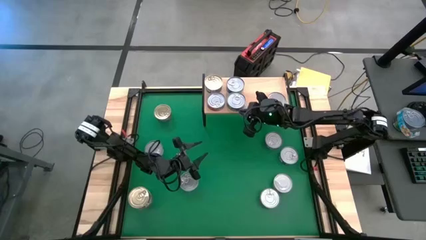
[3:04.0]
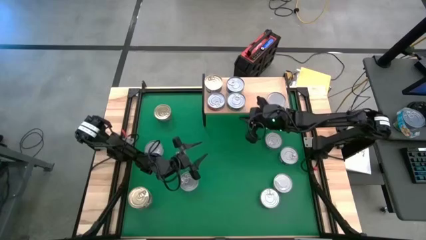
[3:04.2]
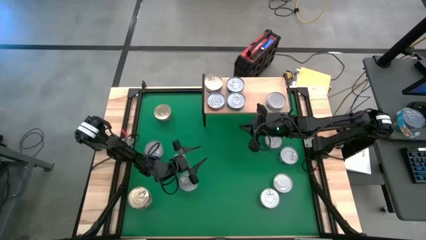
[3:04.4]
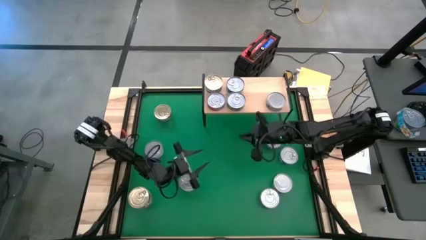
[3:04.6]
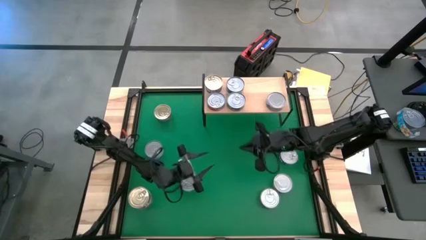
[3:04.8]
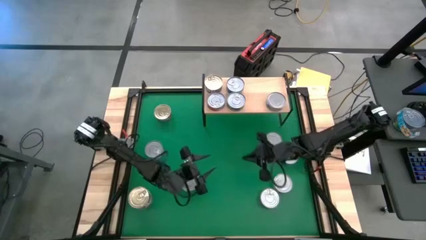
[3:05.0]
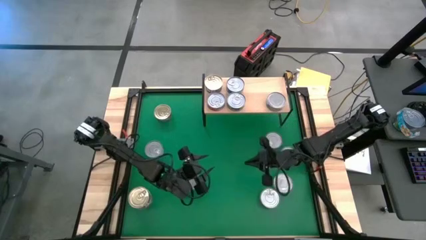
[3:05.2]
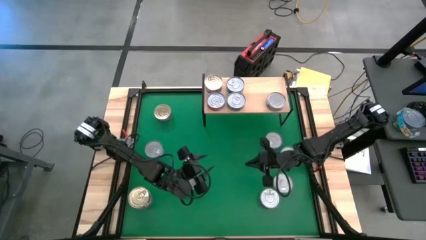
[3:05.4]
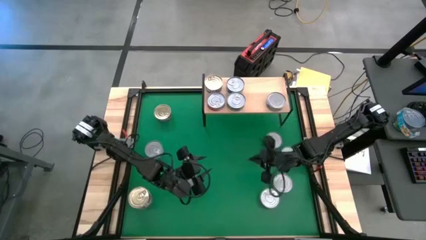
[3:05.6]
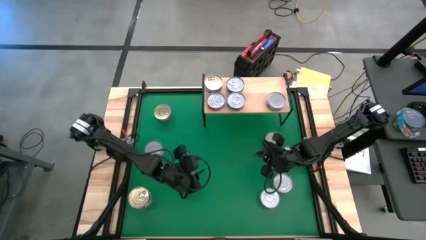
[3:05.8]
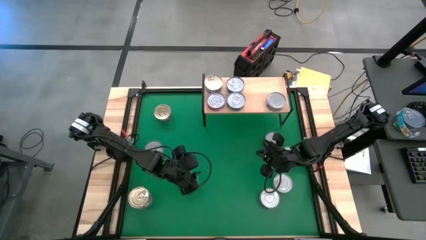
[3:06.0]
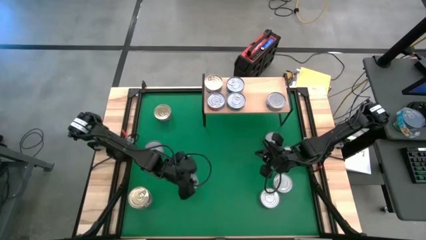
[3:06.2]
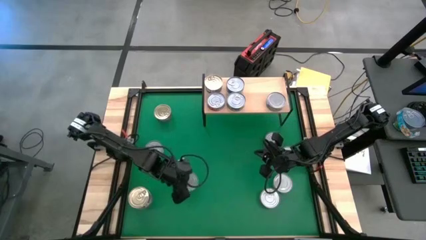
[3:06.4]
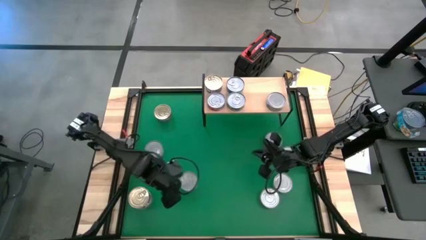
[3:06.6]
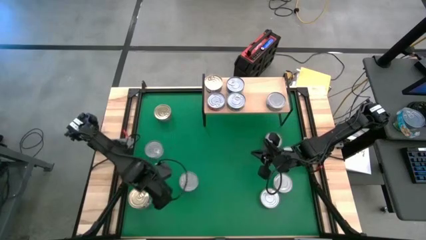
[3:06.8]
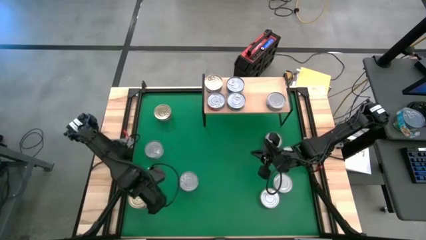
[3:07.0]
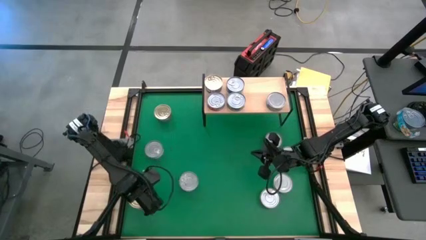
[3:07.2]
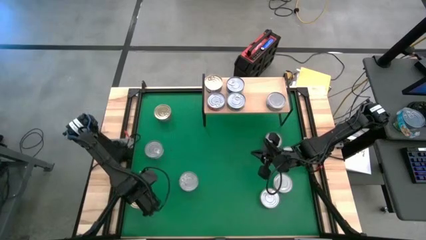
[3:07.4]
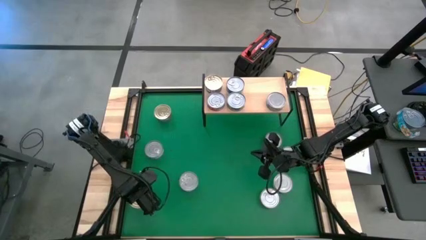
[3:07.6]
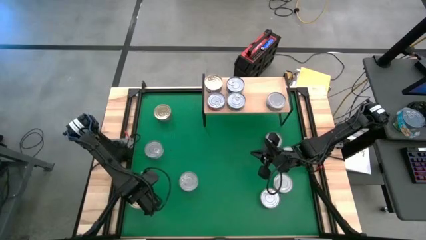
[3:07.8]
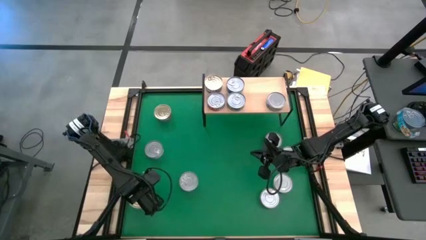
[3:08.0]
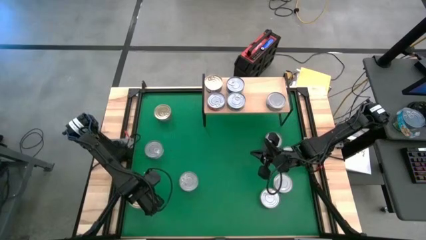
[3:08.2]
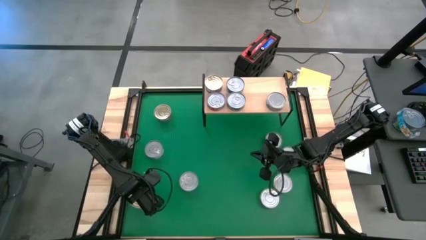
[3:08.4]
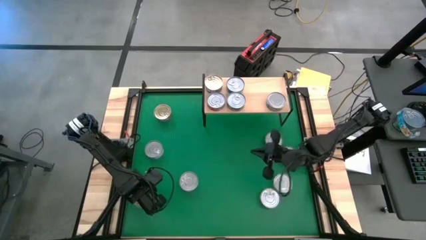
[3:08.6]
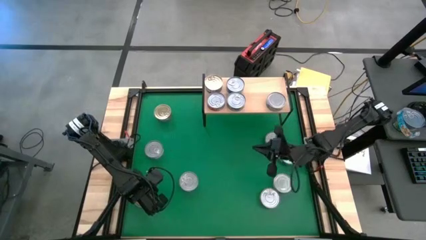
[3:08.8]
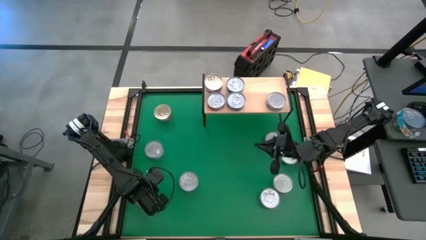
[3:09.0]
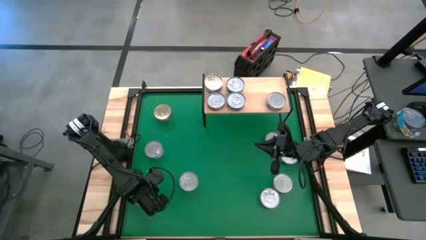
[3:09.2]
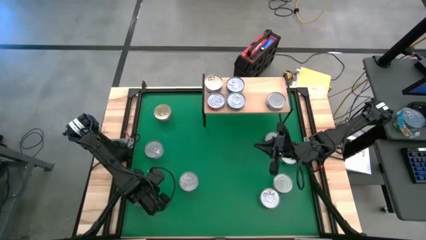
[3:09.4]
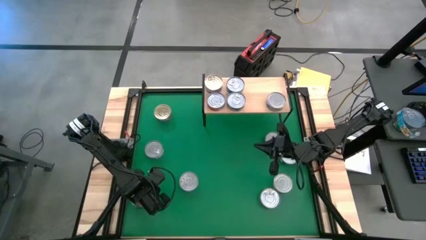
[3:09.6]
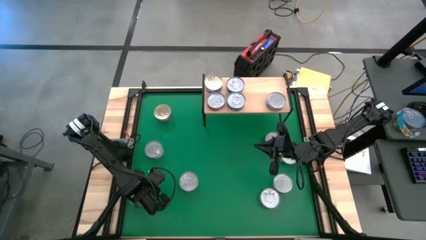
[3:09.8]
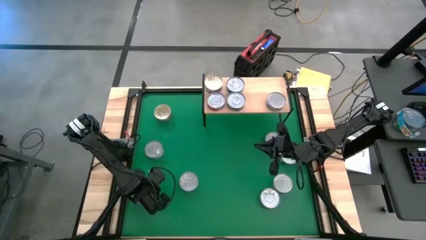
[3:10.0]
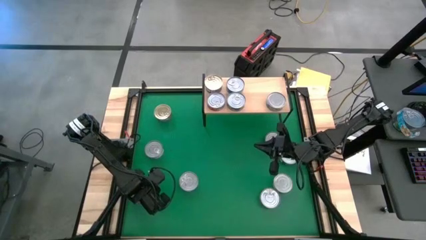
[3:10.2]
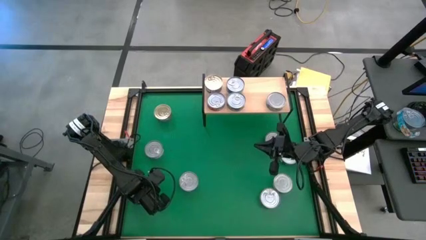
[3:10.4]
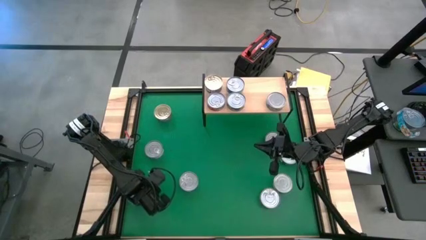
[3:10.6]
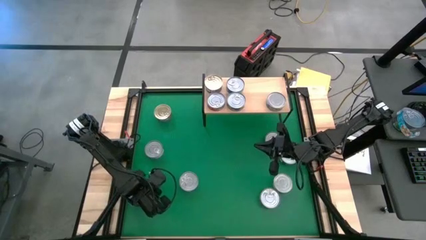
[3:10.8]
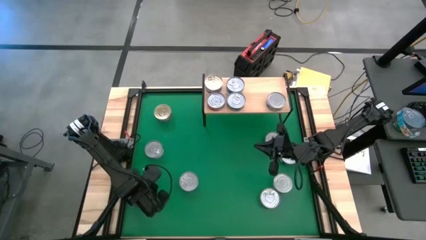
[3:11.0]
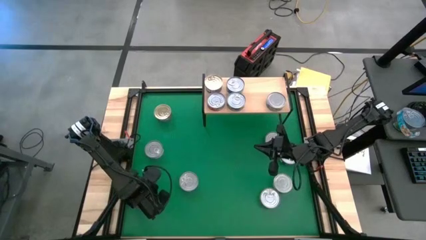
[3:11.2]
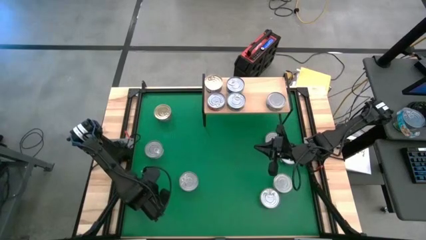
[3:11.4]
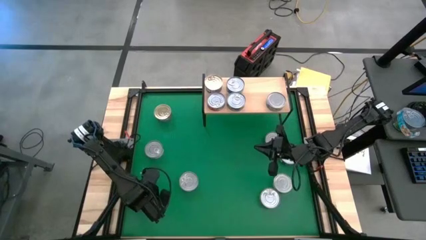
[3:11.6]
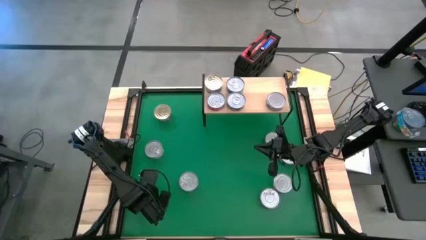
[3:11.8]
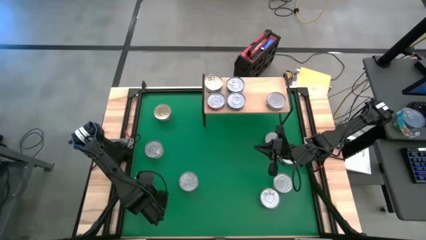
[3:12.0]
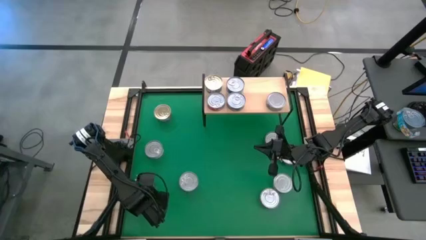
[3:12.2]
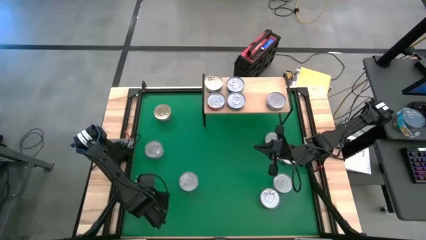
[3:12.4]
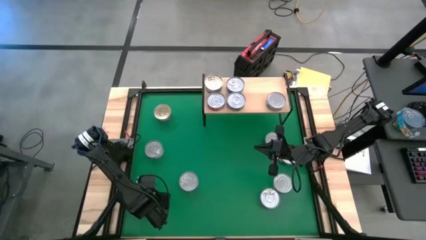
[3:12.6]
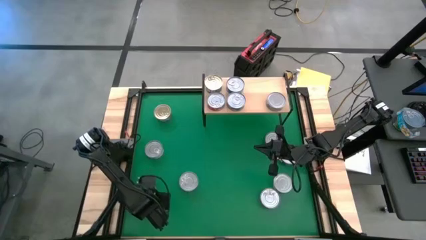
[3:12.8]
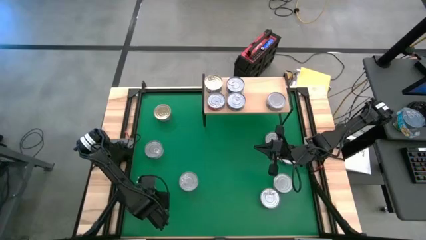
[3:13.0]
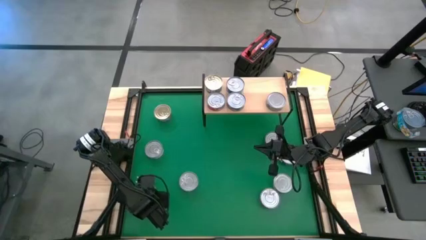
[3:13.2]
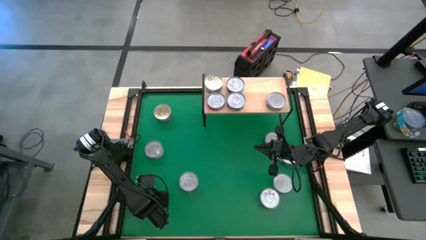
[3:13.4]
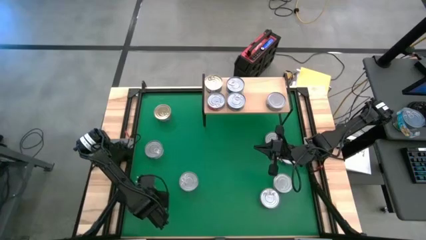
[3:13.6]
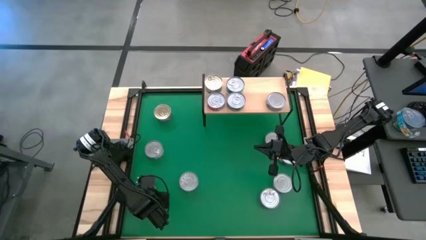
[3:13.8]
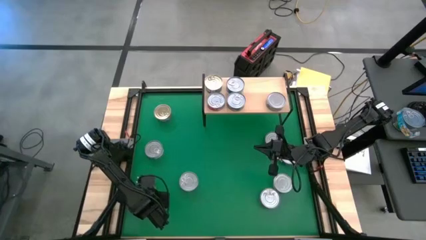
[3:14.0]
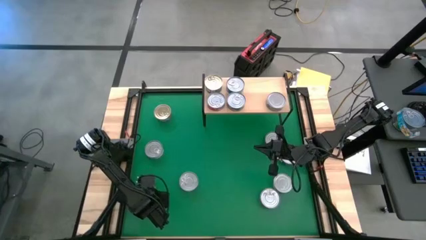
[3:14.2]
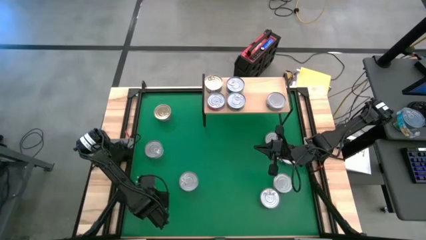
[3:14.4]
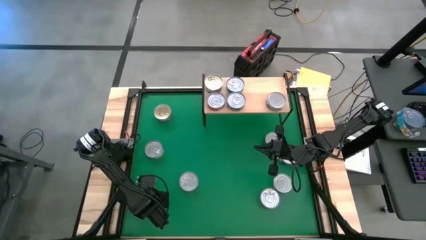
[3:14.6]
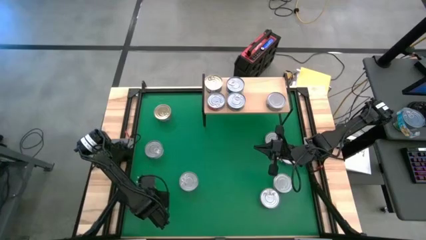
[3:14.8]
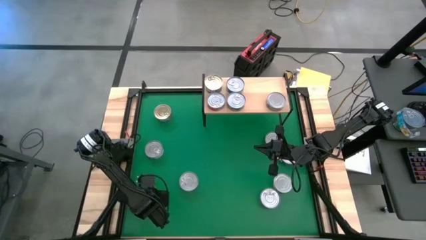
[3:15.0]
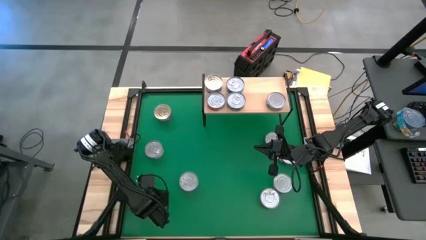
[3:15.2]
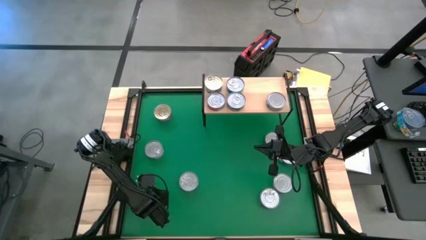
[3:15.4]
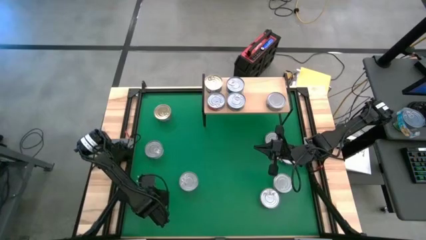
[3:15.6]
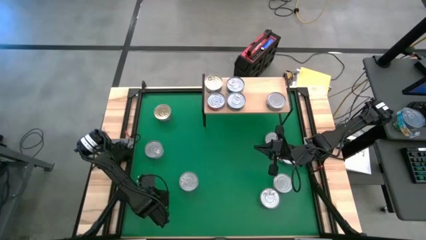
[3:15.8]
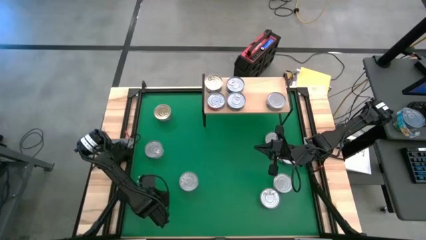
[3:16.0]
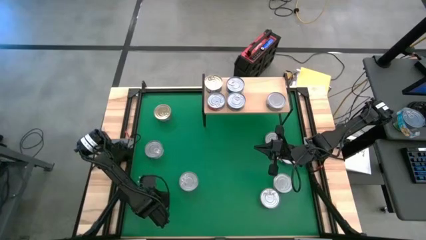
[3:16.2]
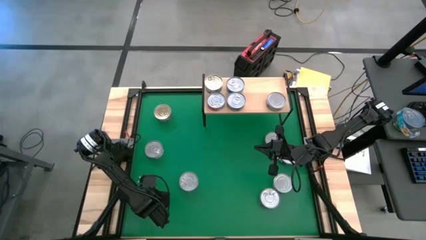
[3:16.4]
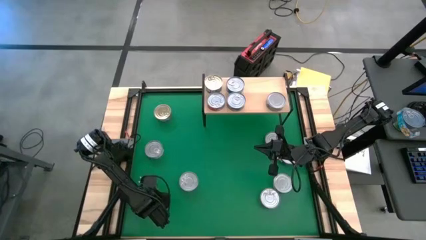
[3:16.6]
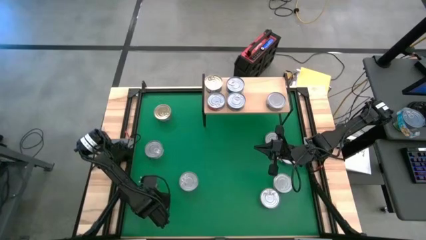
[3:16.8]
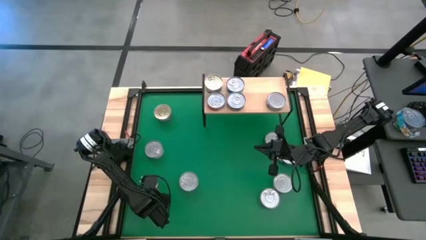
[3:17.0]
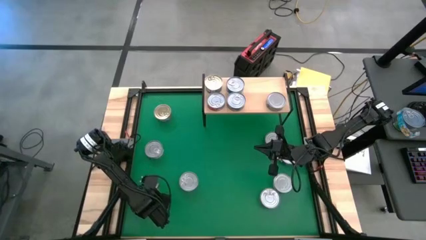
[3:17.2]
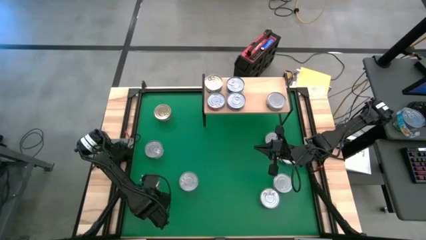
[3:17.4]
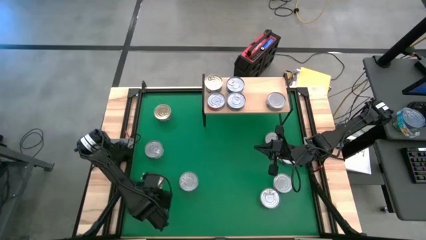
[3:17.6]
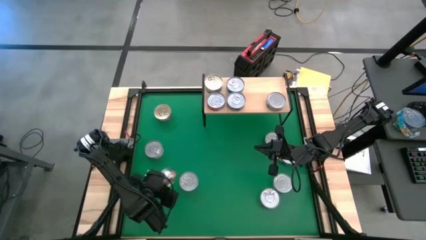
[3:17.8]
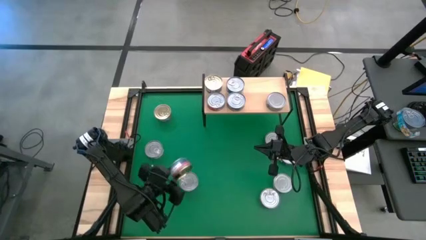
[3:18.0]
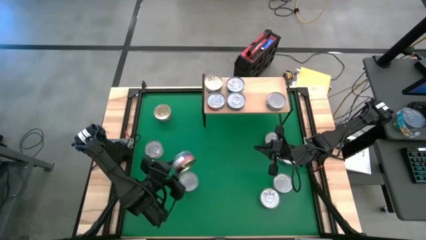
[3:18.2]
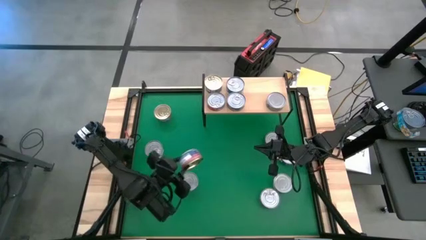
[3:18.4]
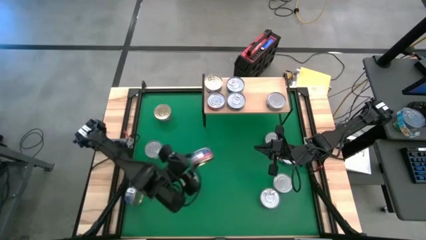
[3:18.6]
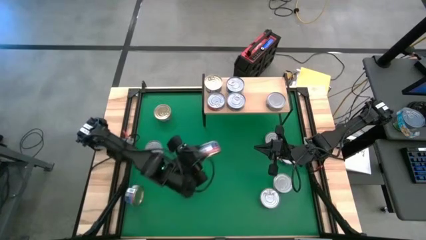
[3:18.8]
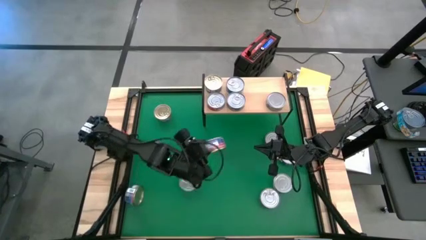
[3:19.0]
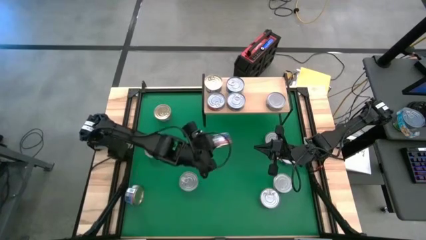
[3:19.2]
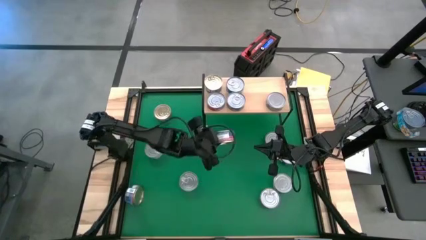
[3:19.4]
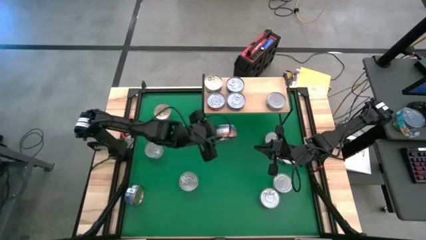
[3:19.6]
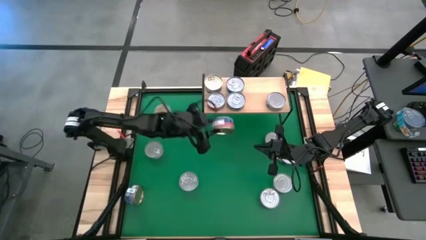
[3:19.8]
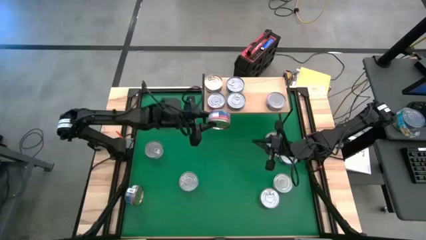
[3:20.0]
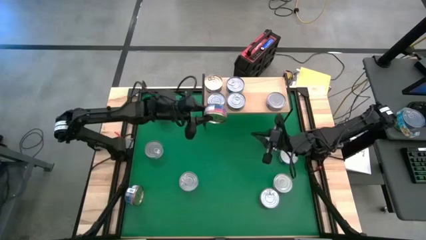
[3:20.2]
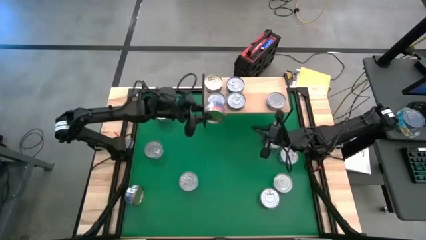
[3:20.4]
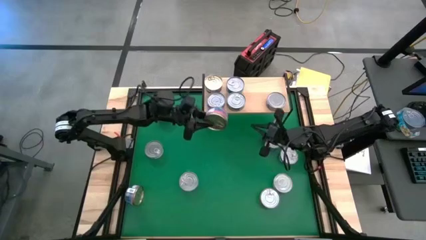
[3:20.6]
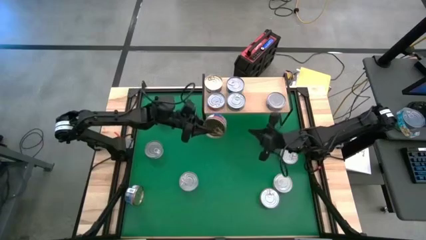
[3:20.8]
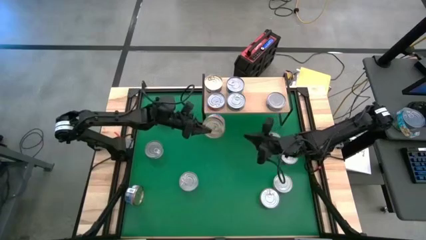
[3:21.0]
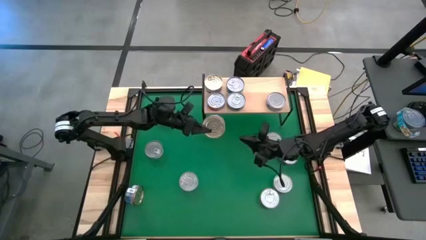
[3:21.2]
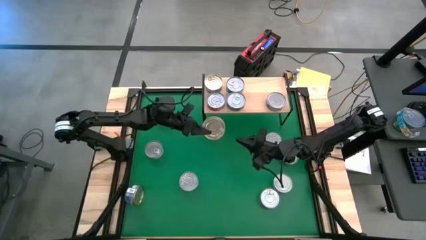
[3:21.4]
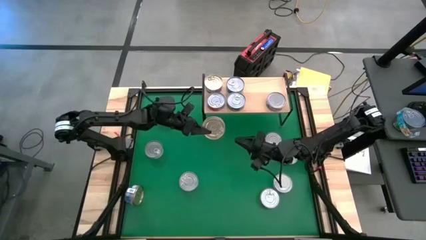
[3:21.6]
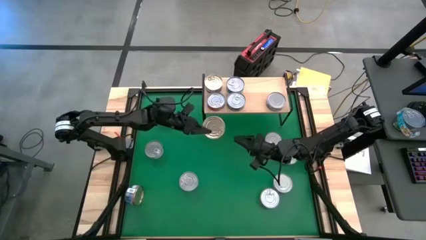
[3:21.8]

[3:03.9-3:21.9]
Task: Stack canned seafood by type on shelf
Stack the blue/pink tuna can on top of the other blue/pink tuna can on the shelf
